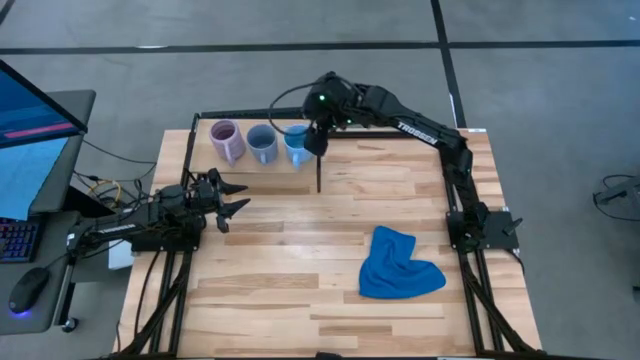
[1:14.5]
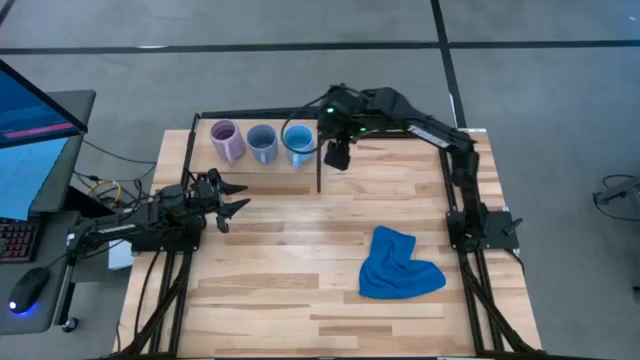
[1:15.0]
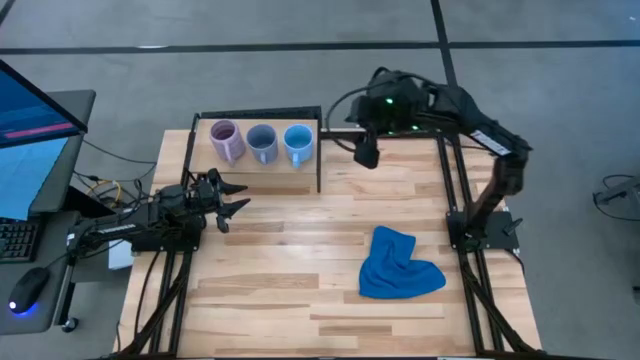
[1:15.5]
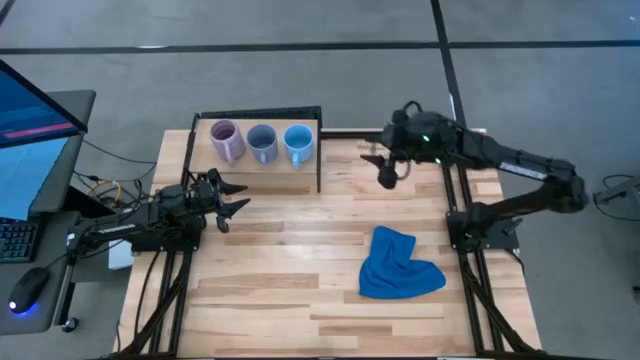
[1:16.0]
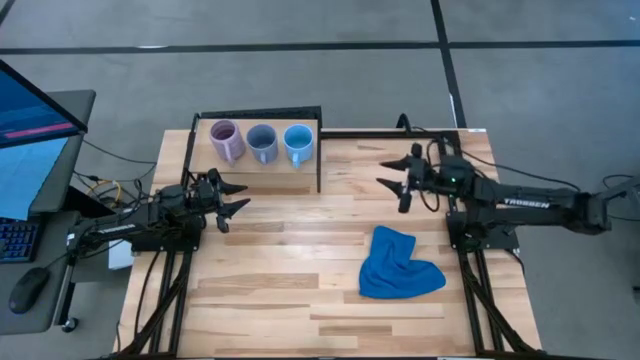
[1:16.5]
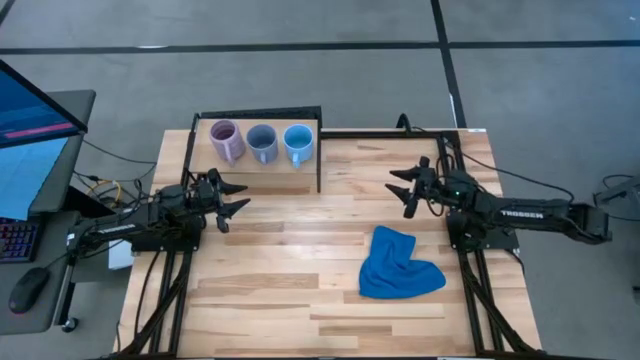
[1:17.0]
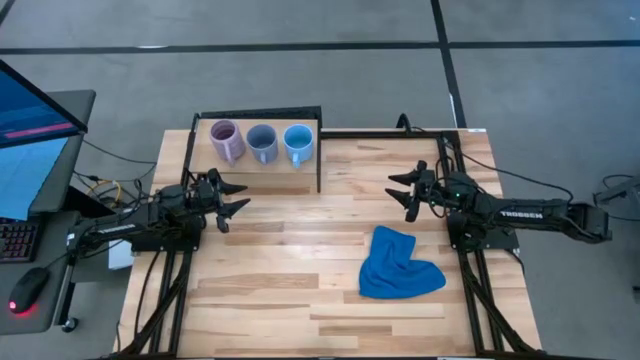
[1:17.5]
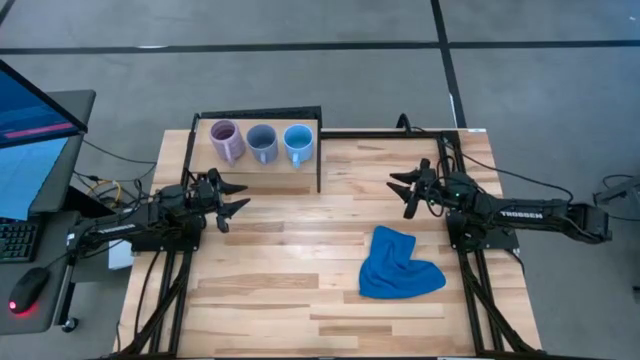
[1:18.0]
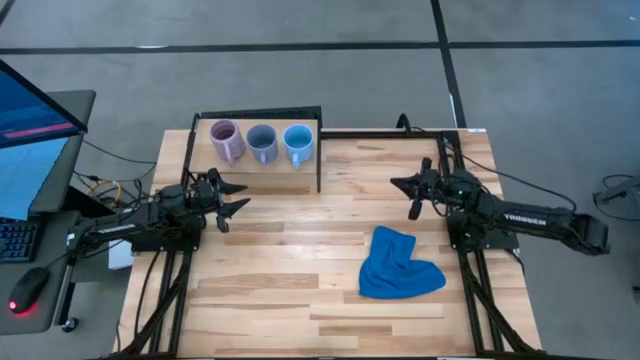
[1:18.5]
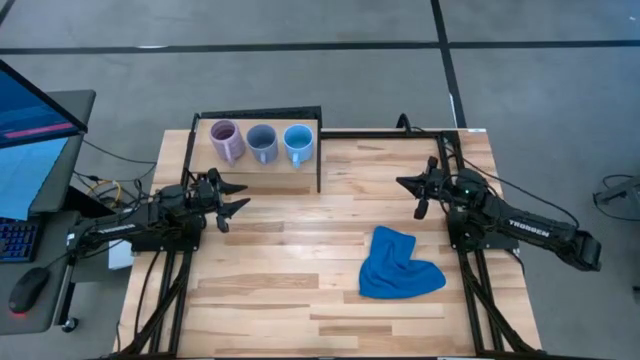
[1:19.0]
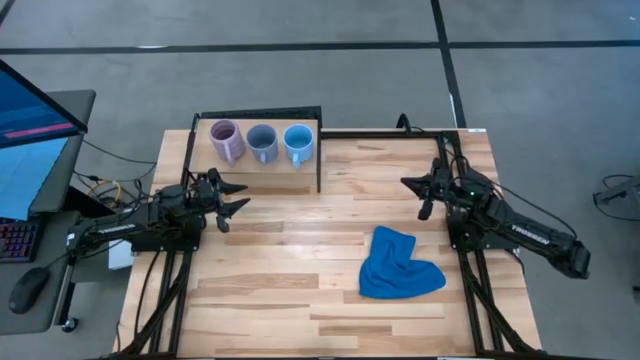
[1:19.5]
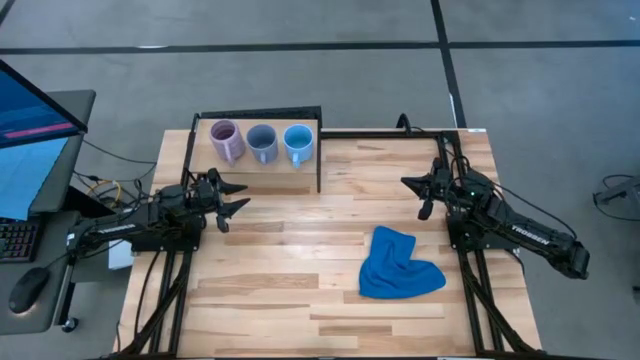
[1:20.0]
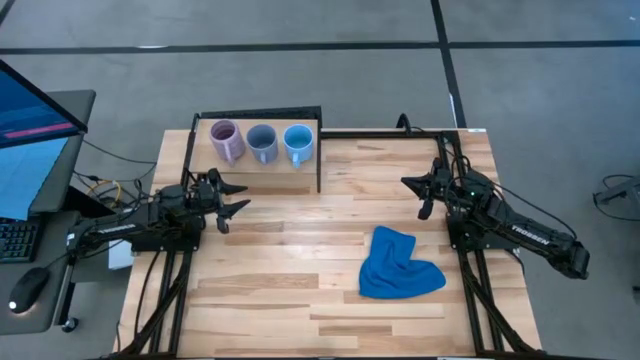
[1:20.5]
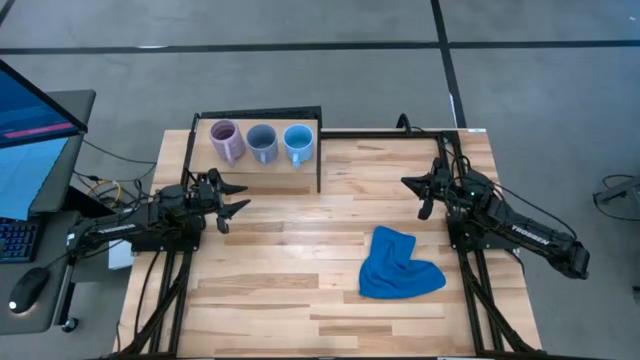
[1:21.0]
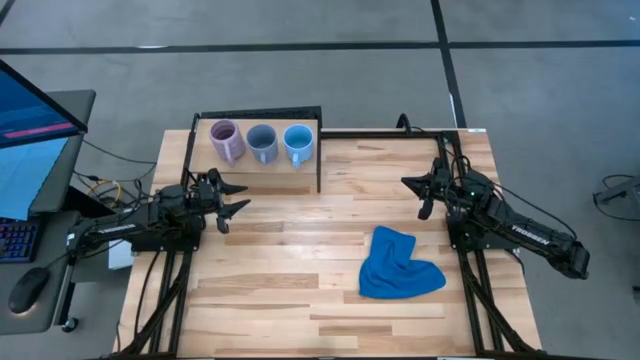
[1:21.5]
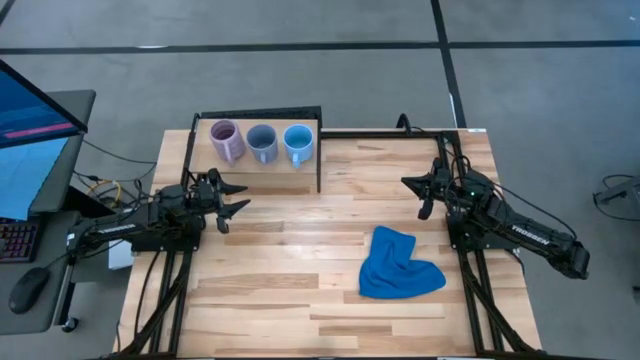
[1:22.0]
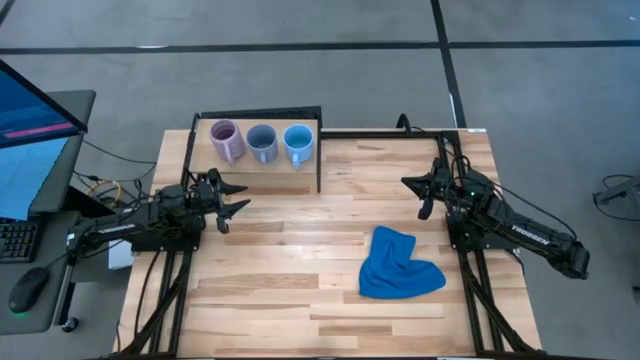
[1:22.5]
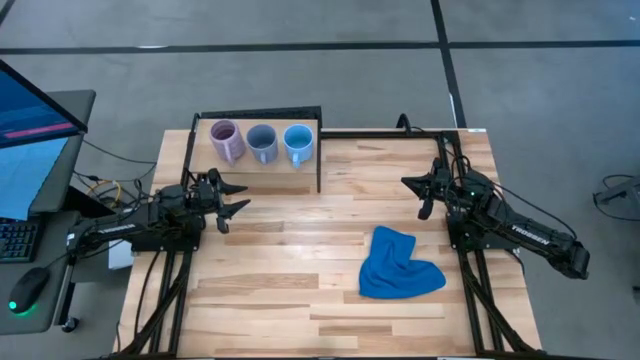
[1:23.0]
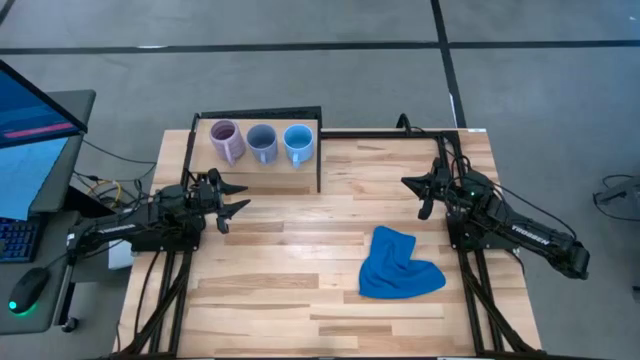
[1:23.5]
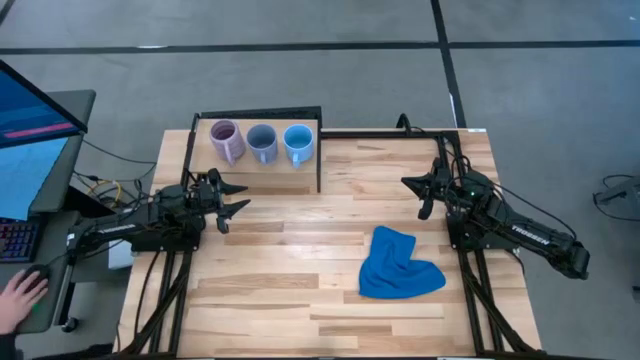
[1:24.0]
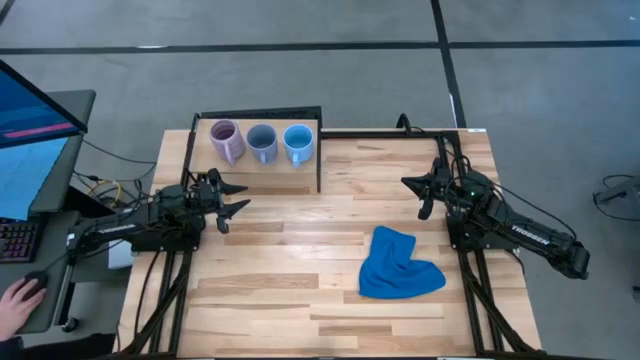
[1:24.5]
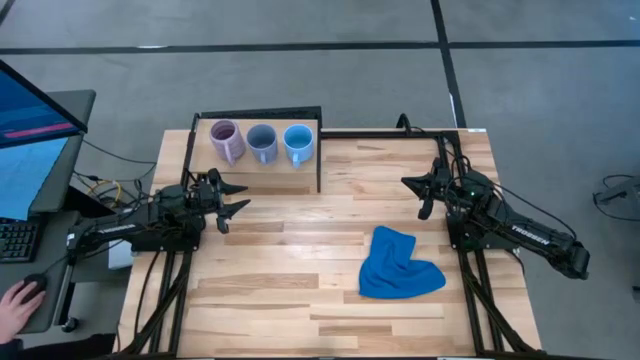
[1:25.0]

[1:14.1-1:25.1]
Task: Stack small to large cups/mugs on shelf
Return to Home Position

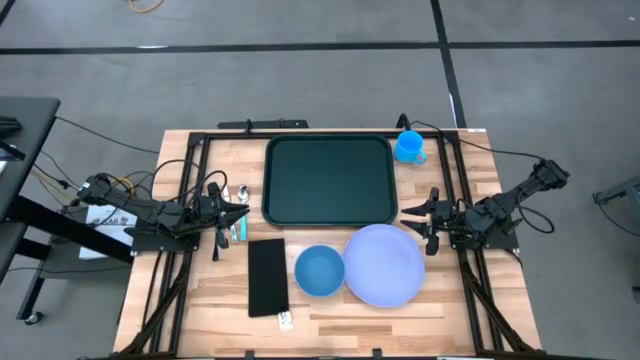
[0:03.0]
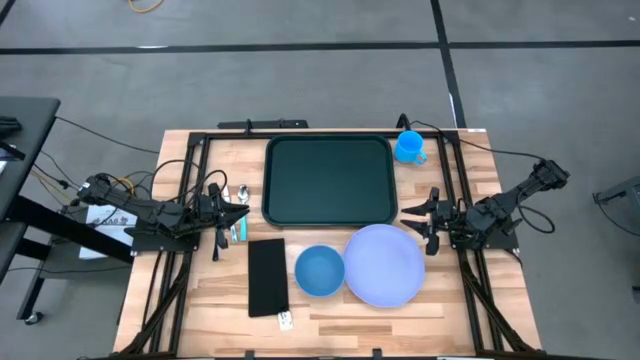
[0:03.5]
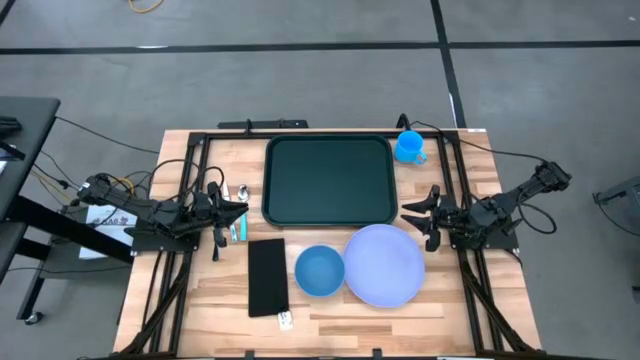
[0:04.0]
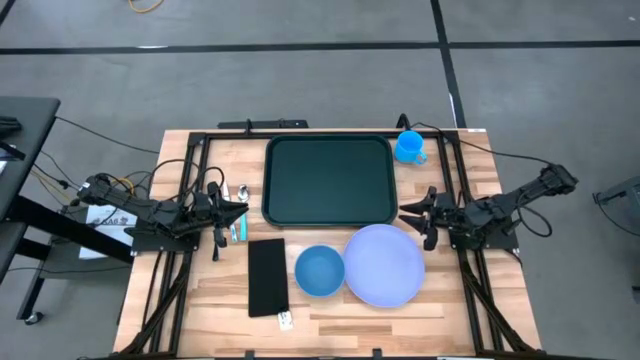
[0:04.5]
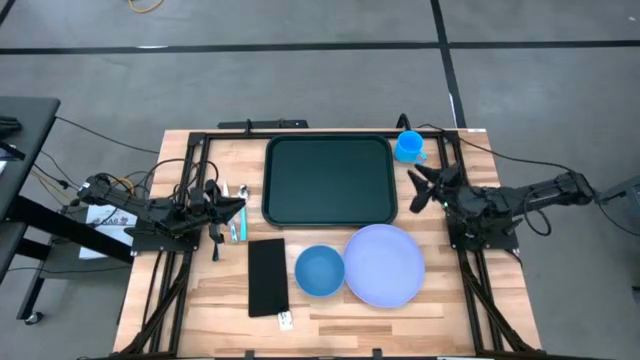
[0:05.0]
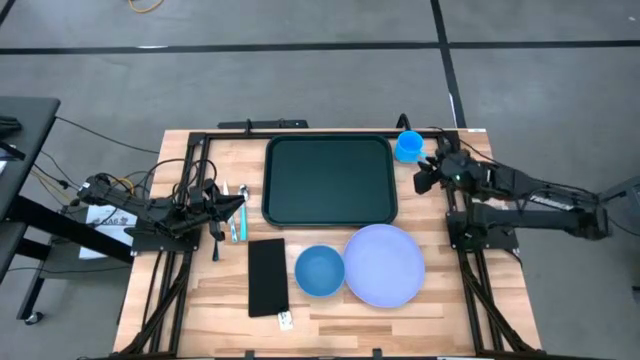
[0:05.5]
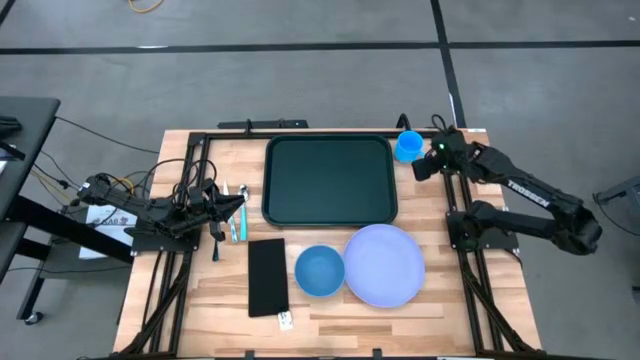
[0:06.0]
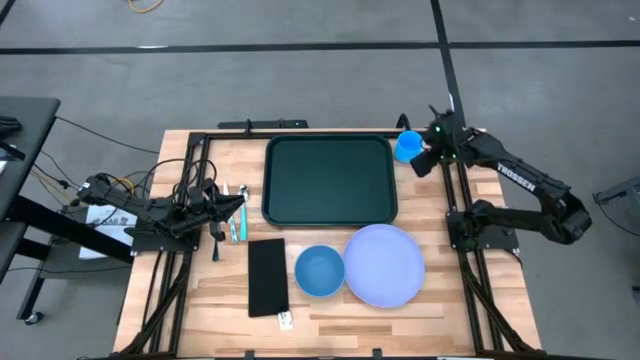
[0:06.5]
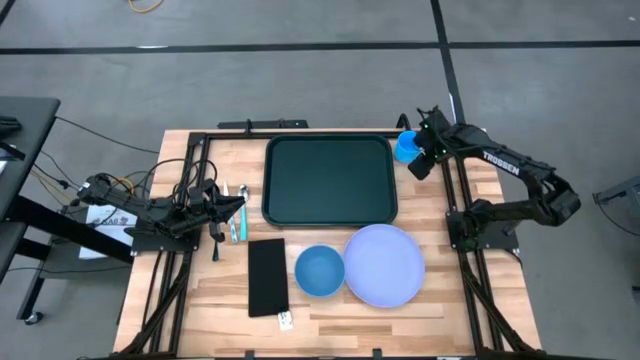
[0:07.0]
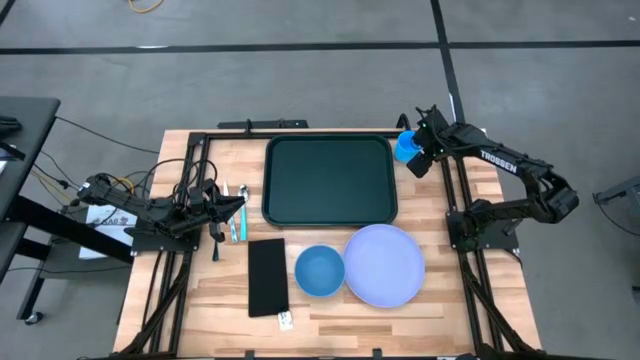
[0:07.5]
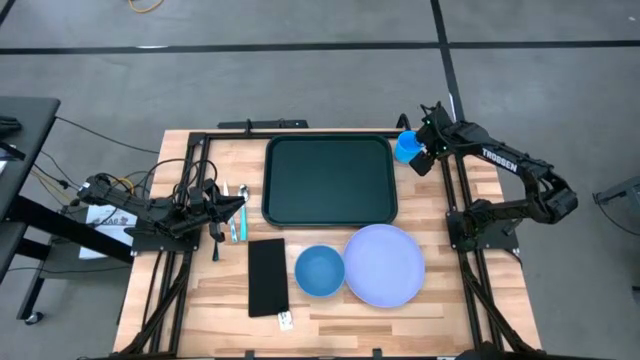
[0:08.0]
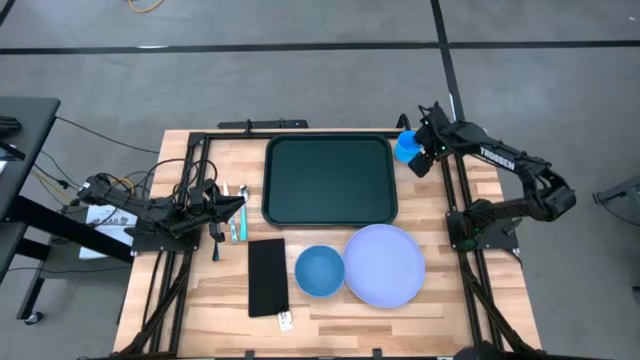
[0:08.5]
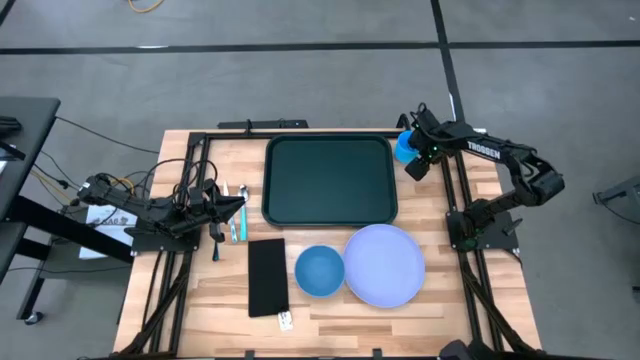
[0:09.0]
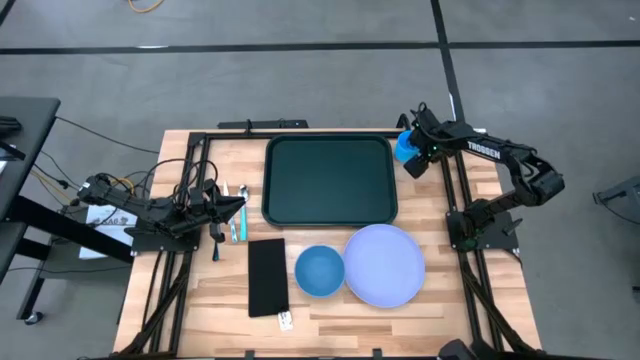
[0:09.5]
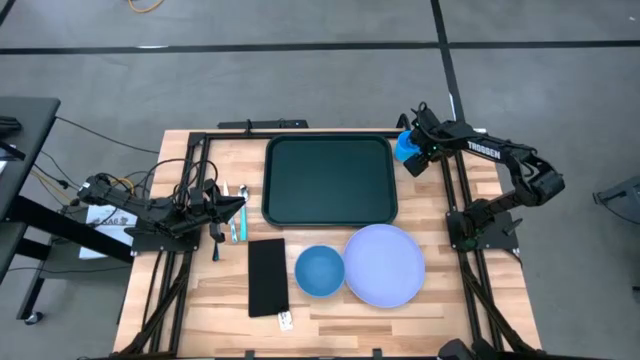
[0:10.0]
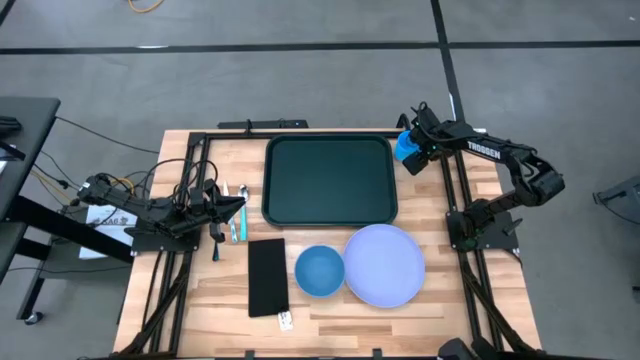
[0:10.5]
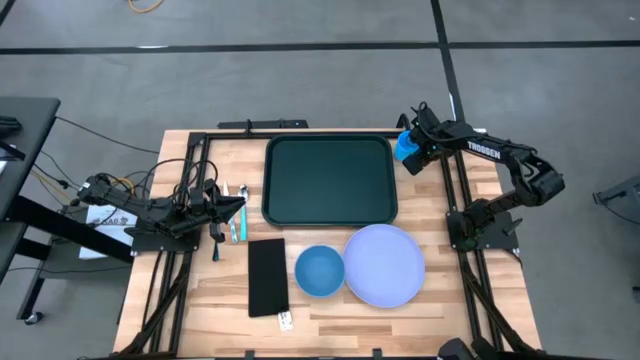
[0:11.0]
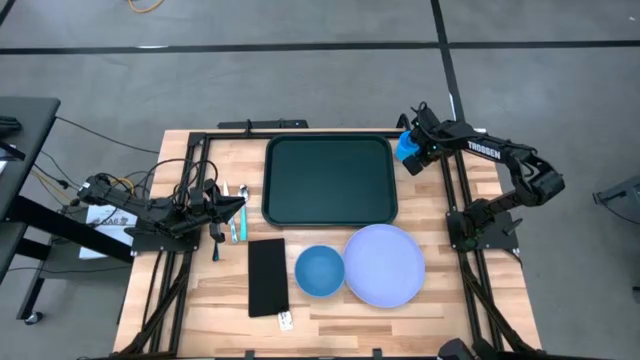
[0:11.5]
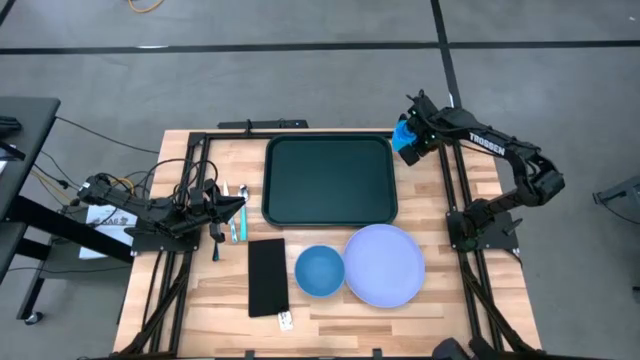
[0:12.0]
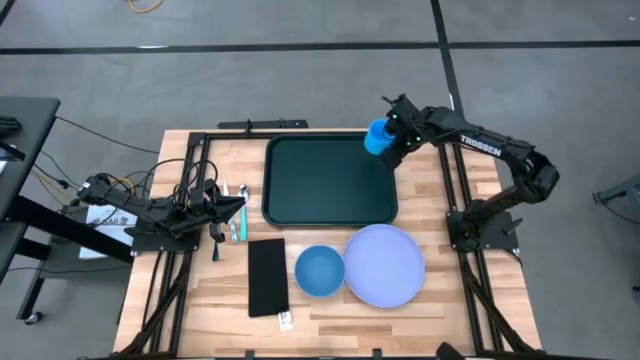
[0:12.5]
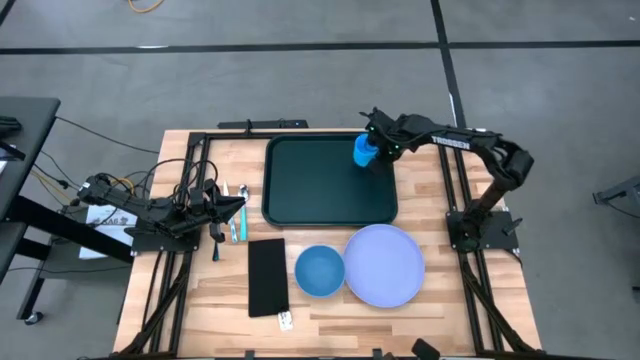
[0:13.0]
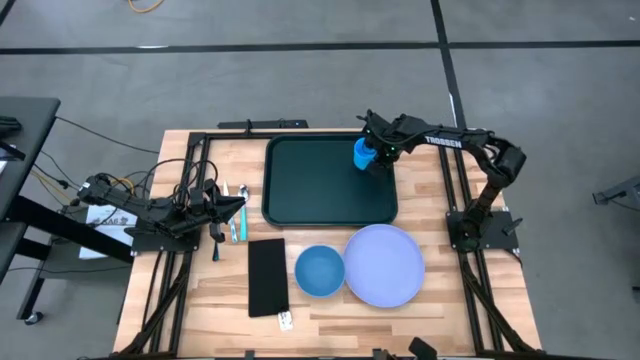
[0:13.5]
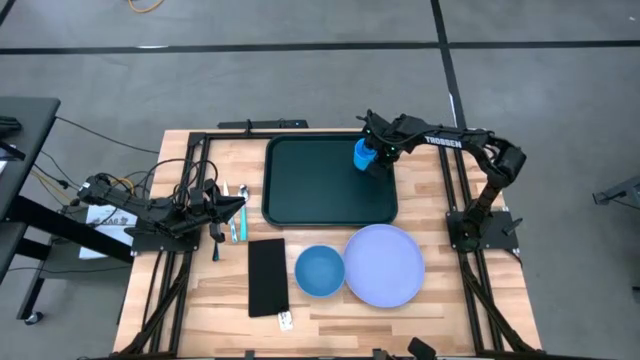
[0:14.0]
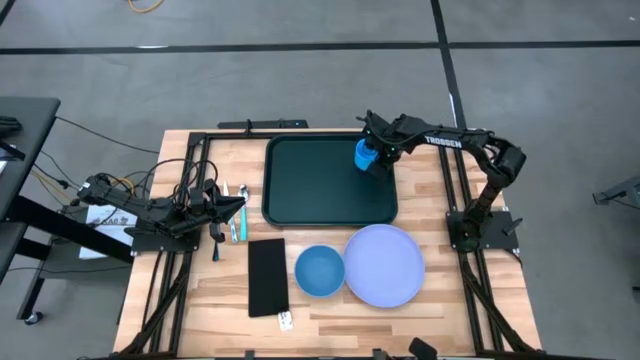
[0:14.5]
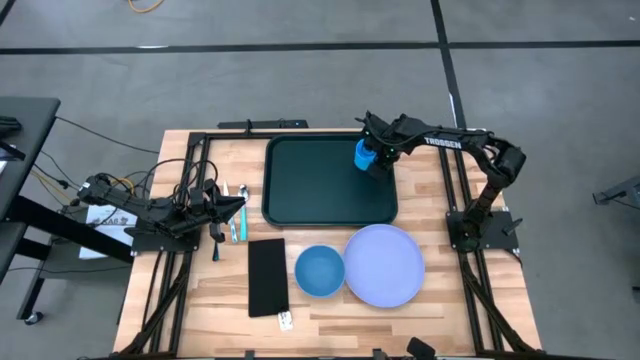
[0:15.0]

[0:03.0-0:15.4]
Task: Set up tray
Put the blue mug on top of the black tray
